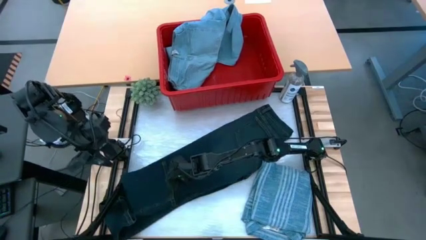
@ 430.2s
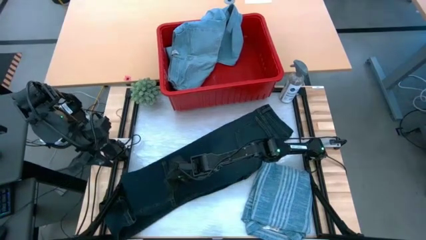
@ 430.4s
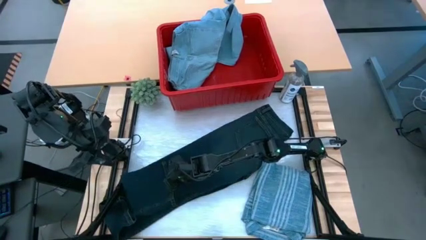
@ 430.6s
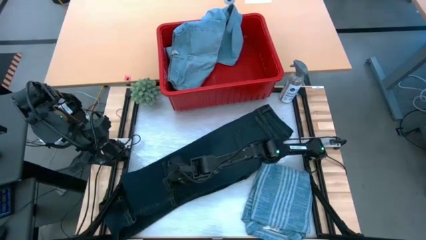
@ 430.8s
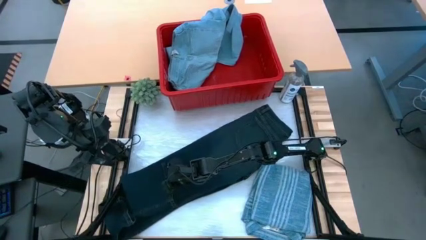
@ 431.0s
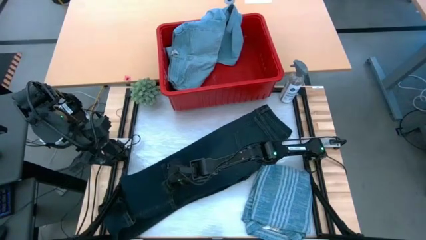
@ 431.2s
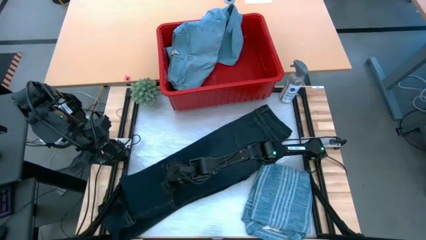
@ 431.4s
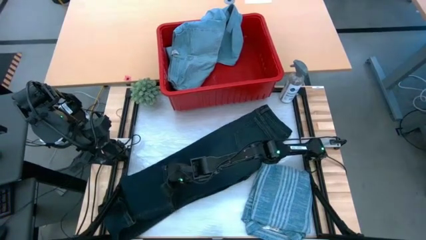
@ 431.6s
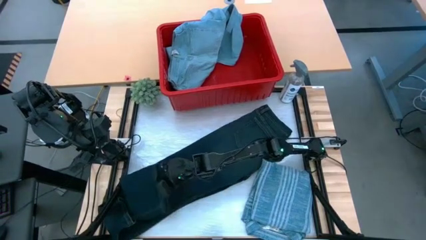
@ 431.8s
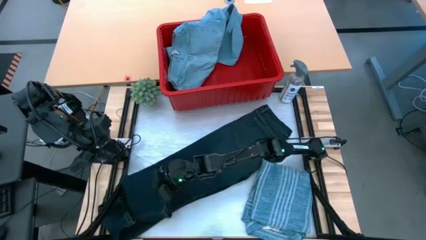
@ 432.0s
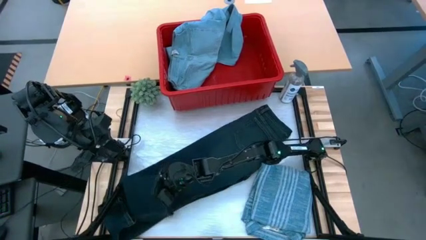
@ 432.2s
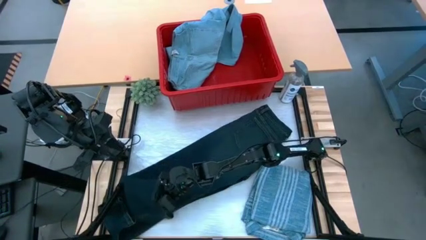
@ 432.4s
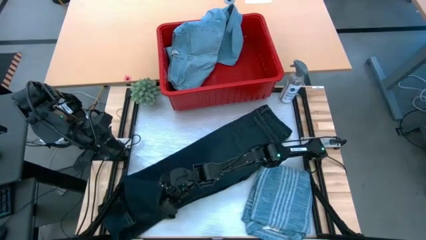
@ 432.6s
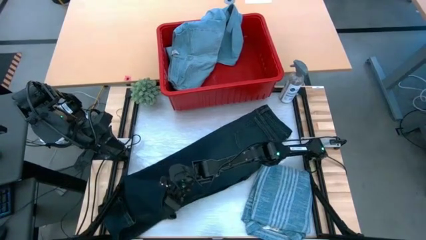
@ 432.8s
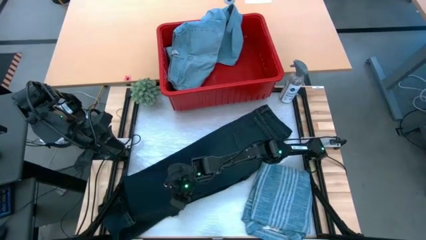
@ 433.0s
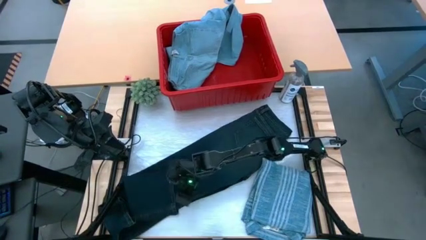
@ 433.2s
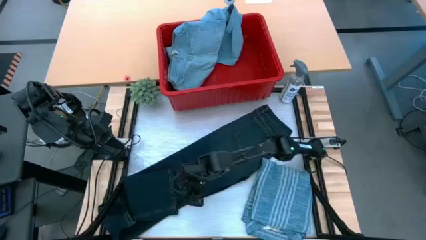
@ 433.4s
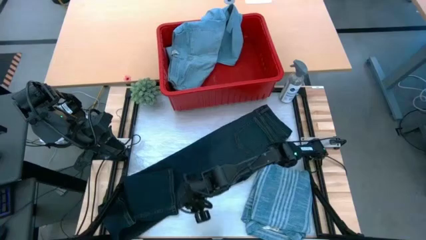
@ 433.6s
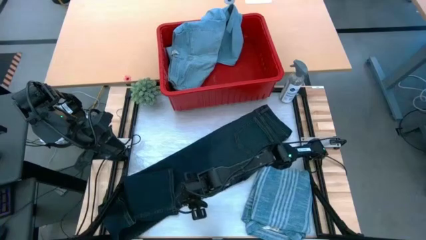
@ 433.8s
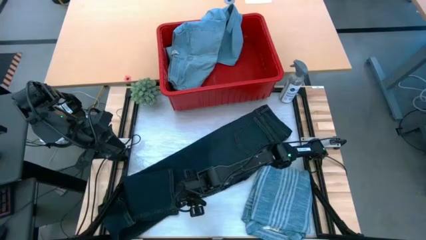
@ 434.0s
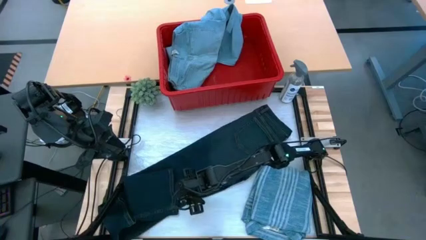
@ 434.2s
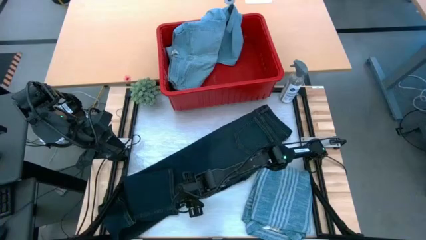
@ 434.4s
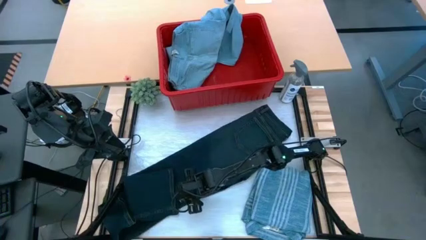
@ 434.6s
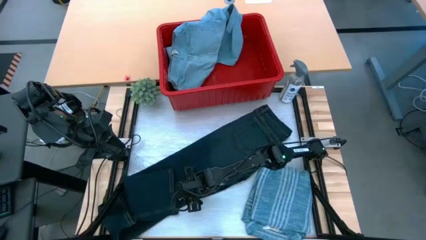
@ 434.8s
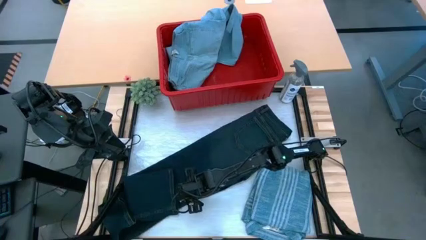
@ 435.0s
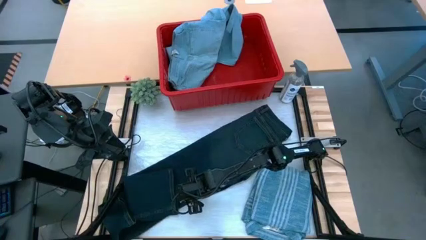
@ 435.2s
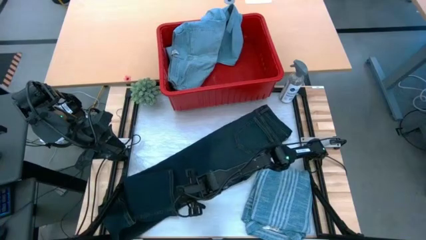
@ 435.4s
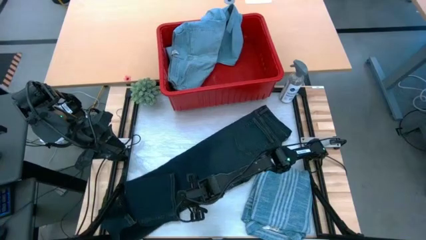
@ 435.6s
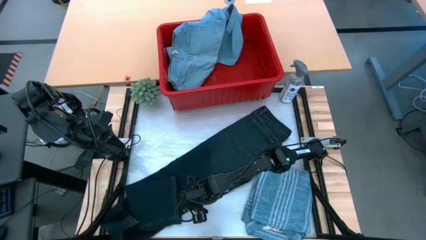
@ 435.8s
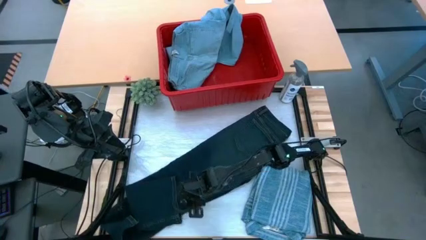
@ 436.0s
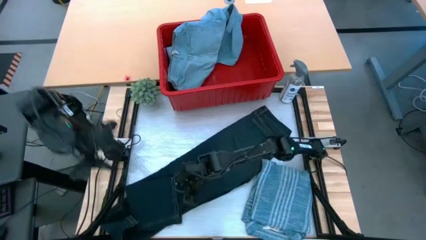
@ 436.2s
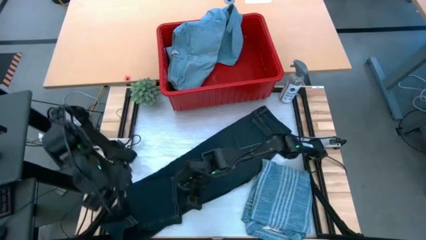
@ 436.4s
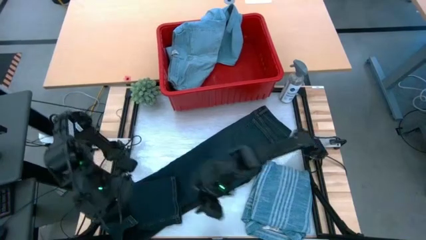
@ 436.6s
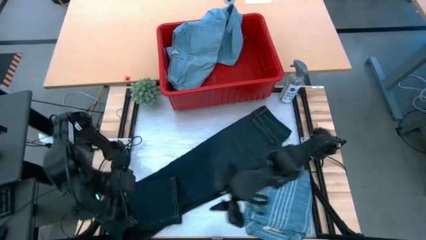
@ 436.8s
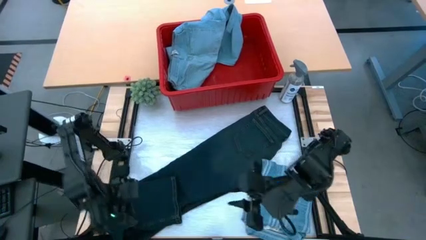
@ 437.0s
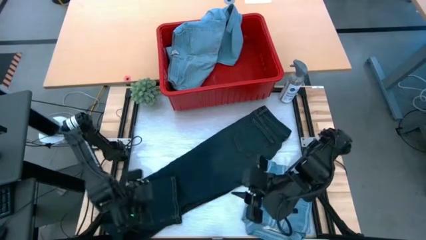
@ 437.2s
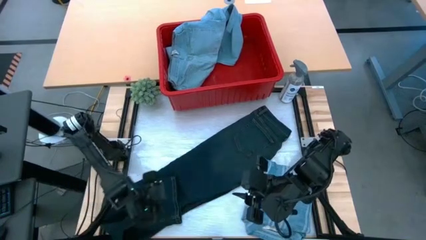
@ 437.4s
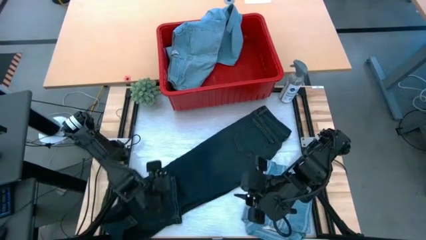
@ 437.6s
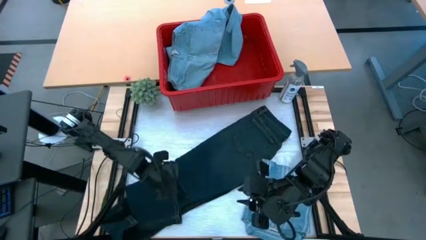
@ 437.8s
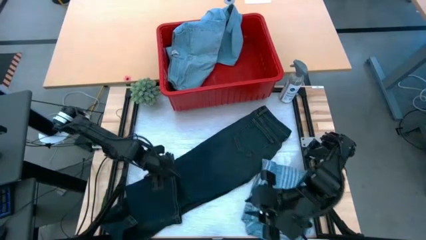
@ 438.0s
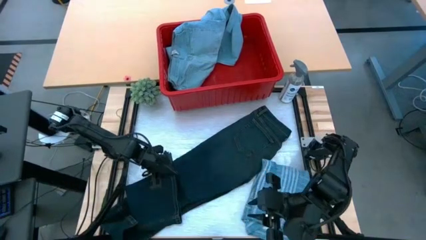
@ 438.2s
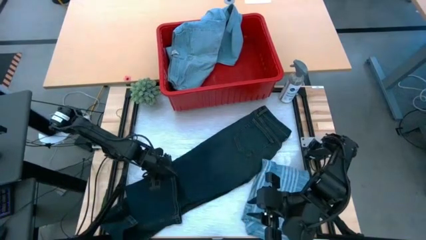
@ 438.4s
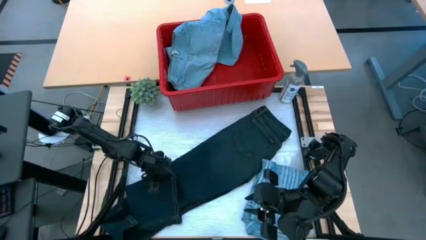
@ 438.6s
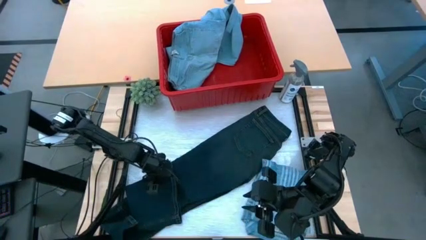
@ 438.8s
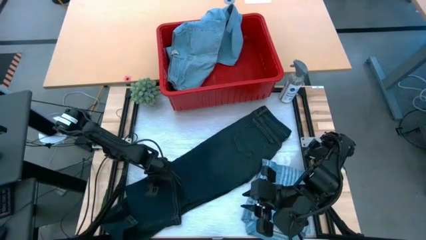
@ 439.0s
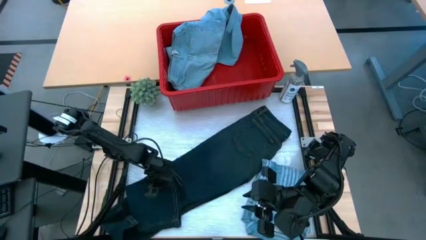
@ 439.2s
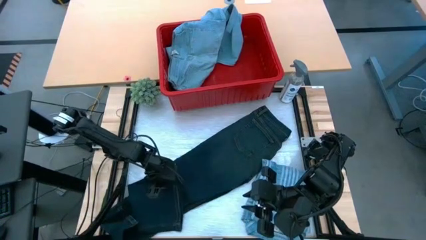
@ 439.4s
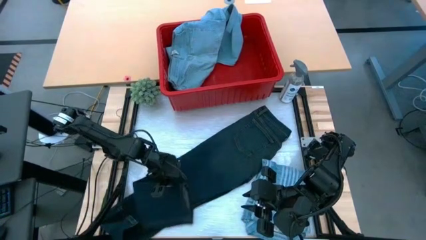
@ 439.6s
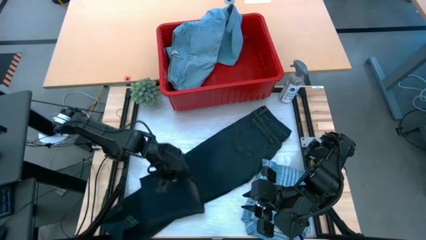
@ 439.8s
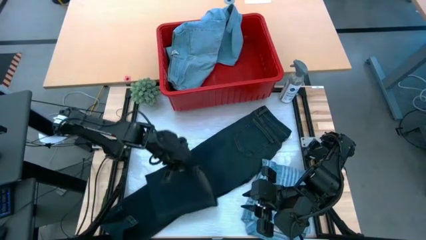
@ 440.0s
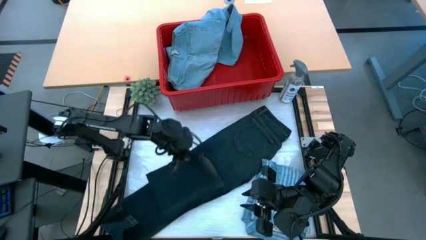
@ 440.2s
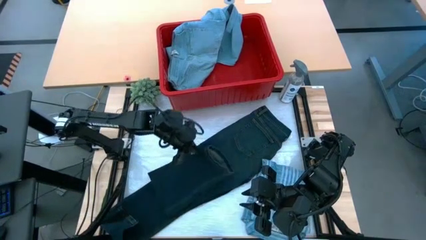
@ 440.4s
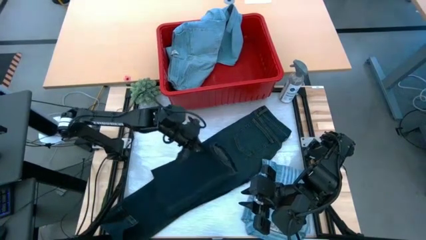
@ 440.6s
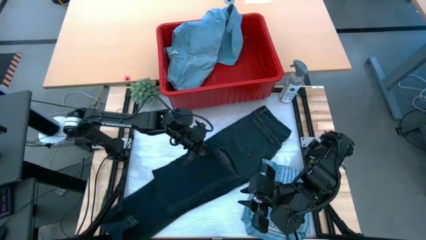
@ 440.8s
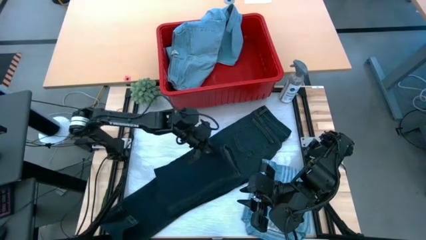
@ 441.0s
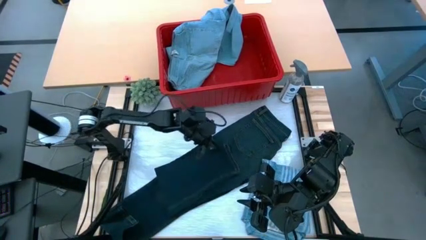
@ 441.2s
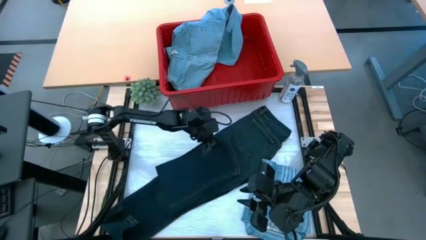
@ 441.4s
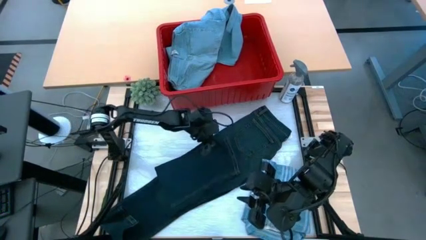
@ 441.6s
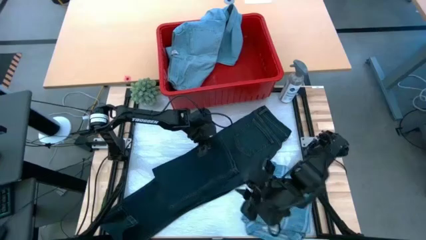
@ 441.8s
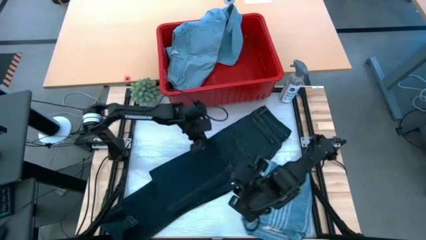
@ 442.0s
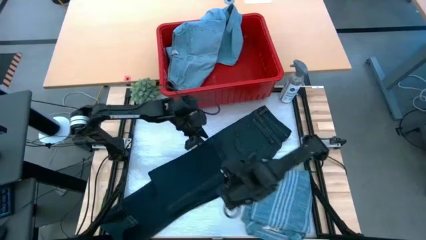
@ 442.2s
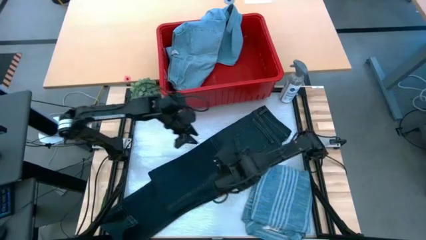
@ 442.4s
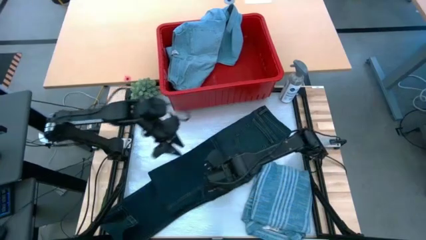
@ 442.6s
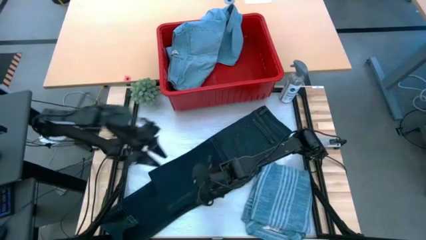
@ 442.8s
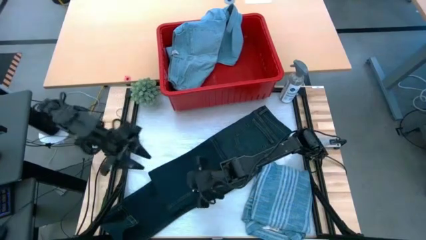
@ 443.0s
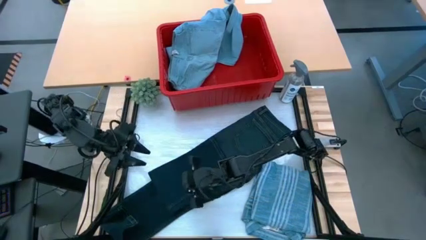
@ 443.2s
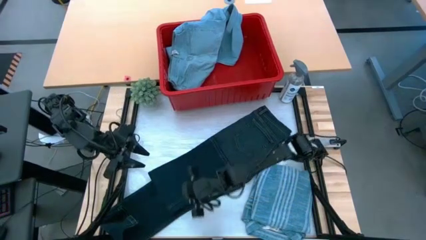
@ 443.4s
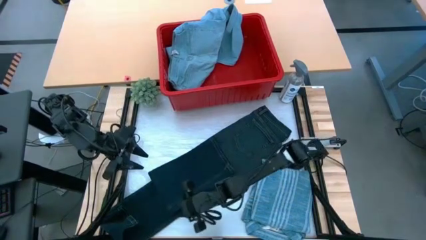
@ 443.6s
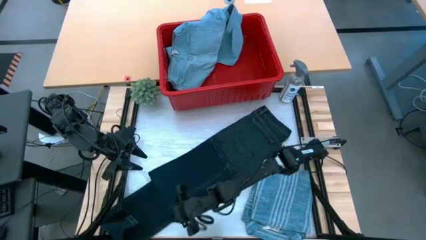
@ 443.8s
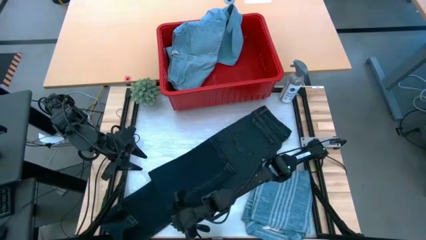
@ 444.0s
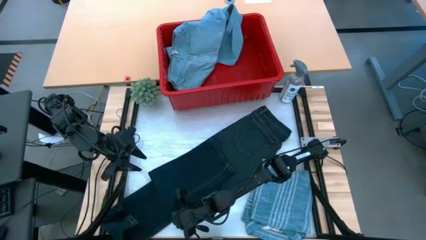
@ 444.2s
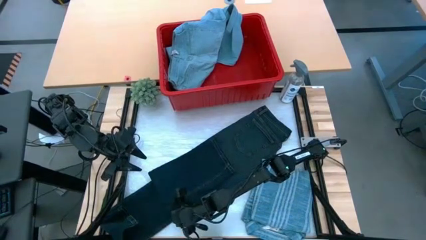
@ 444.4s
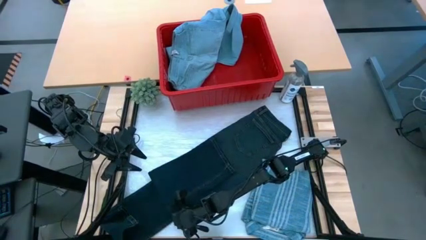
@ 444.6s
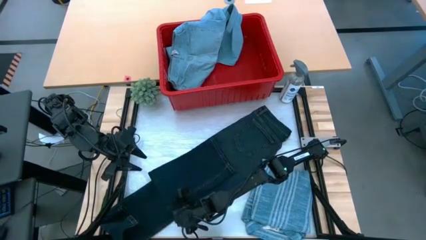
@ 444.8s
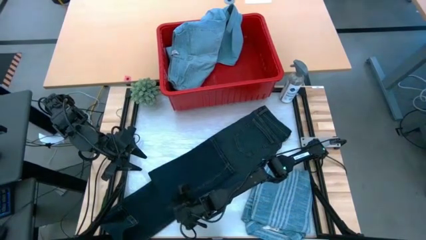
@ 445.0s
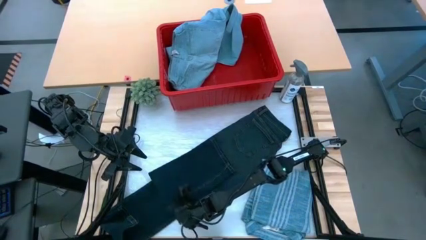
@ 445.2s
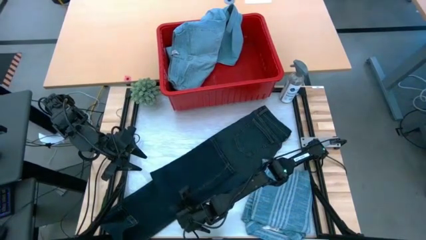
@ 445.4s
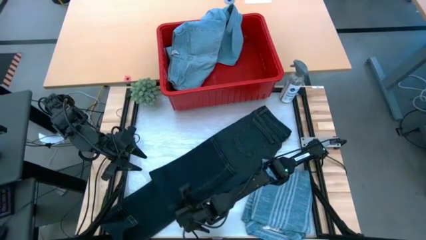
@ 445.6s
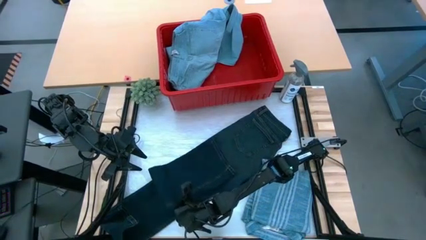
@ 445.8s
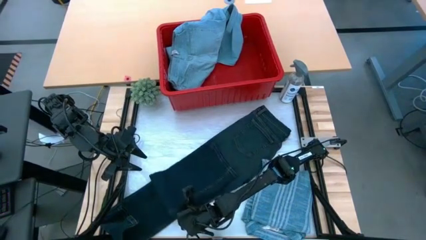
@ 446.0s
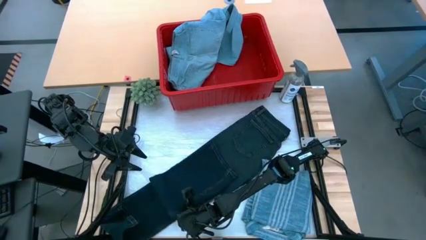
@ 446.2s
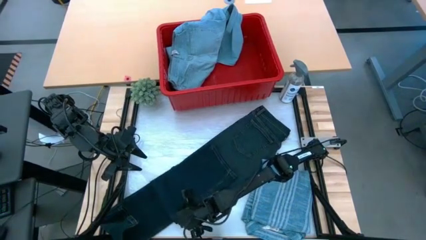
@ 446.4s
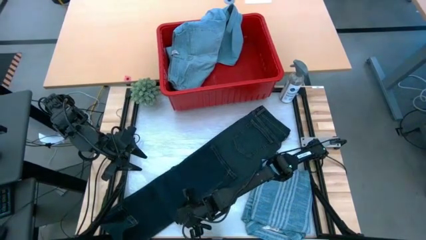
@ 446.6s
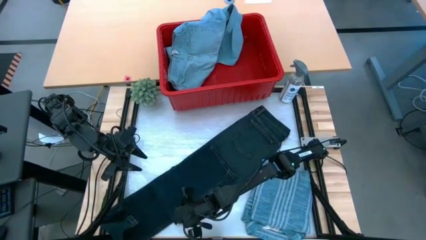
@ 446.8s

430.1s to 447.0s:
Task: Fold Laundry from Bin
Fold the blue denim pants
